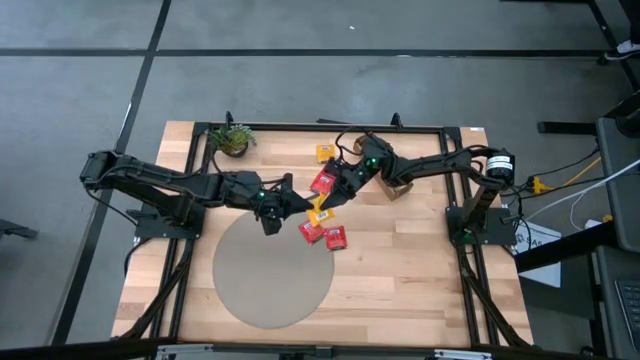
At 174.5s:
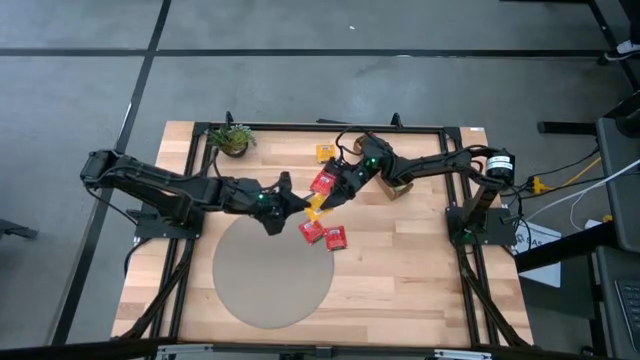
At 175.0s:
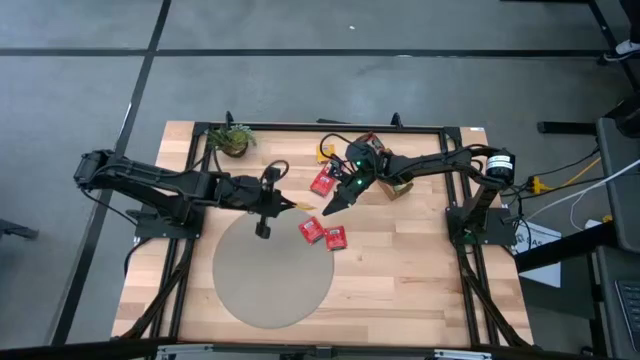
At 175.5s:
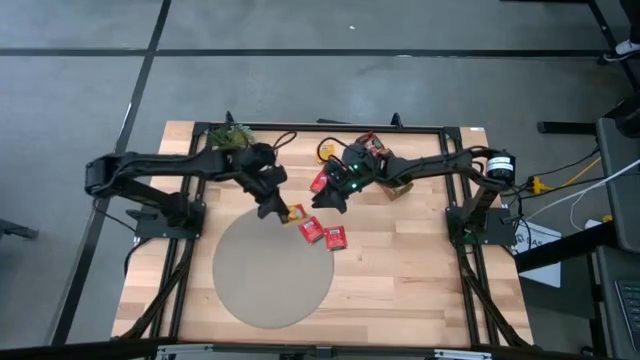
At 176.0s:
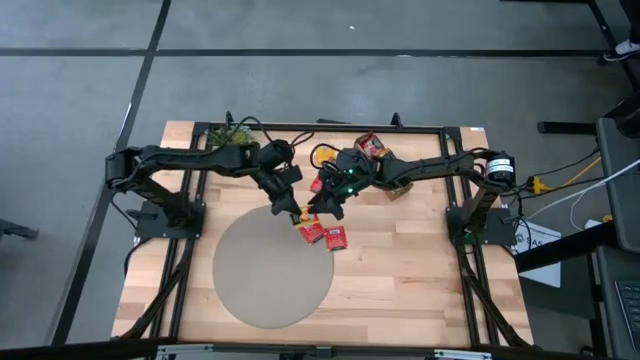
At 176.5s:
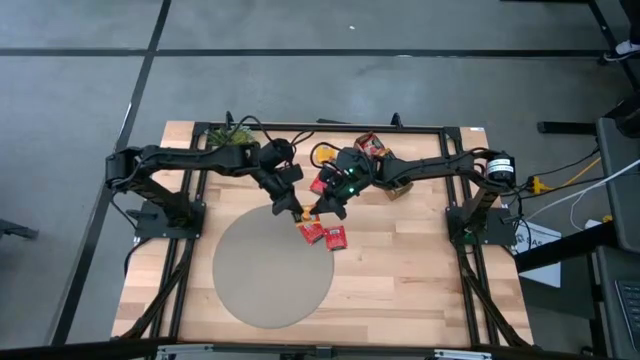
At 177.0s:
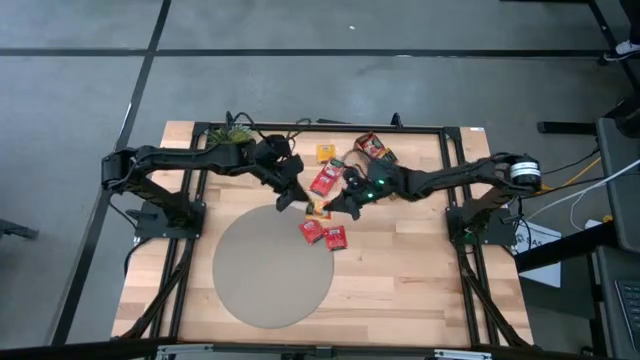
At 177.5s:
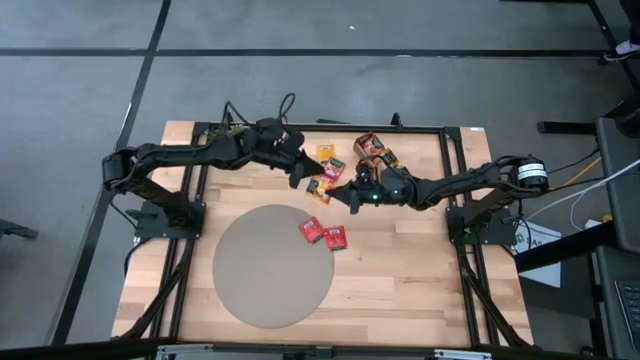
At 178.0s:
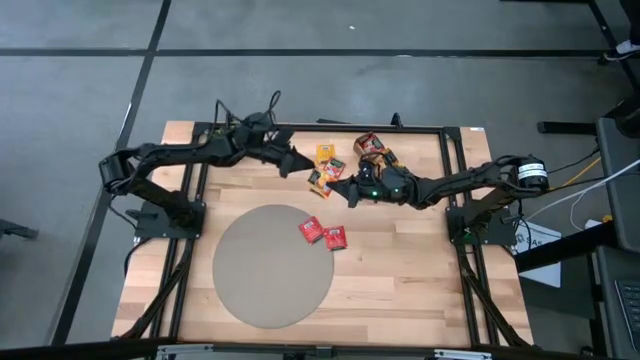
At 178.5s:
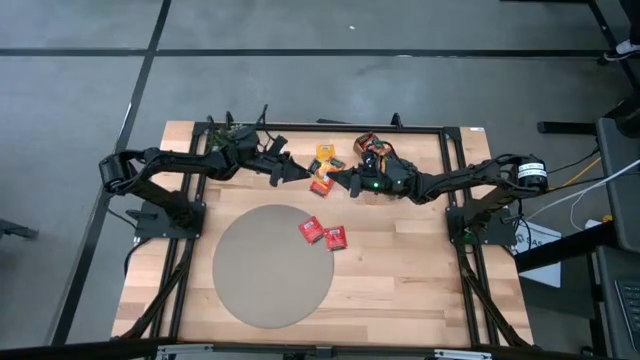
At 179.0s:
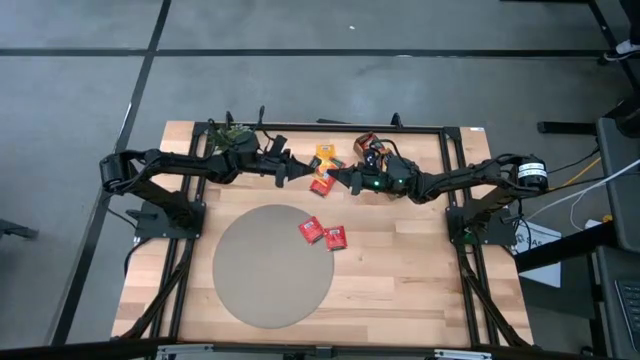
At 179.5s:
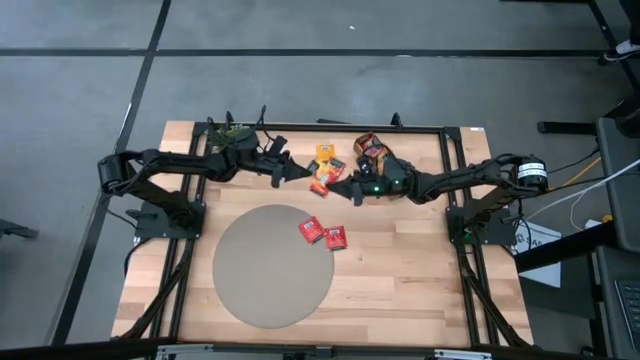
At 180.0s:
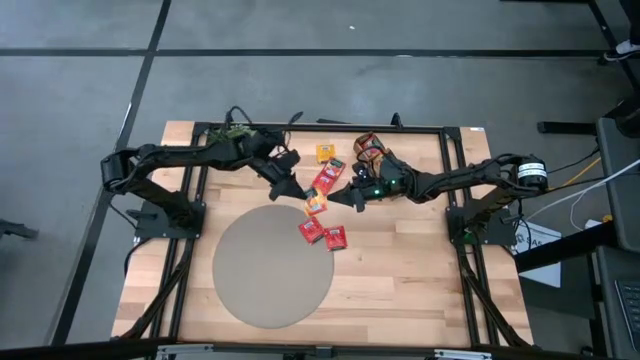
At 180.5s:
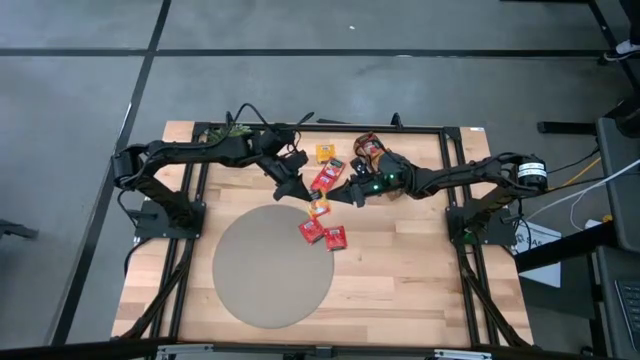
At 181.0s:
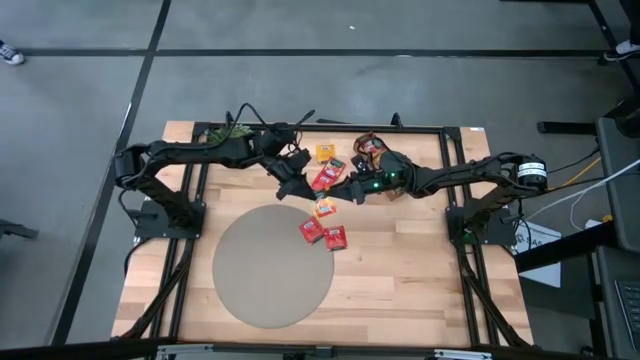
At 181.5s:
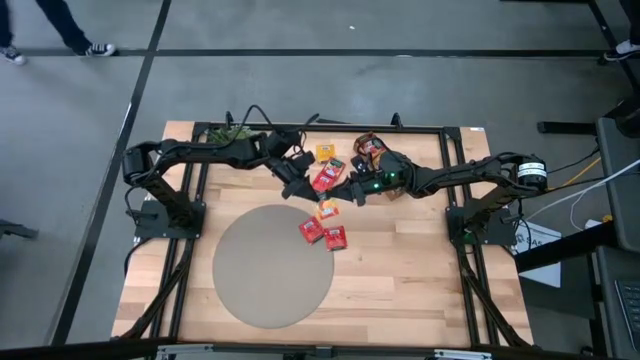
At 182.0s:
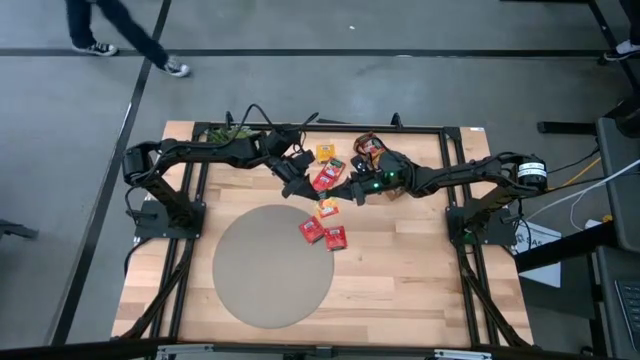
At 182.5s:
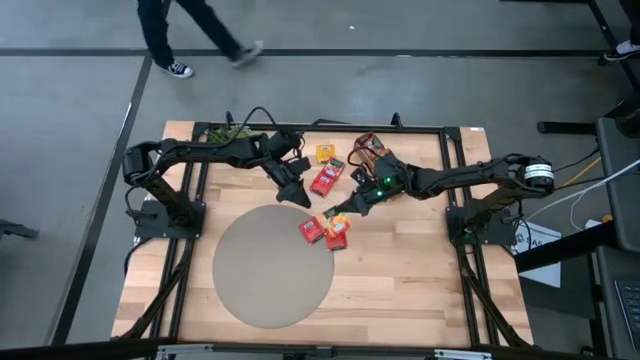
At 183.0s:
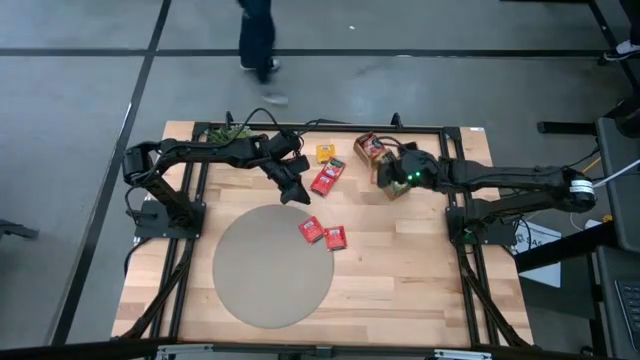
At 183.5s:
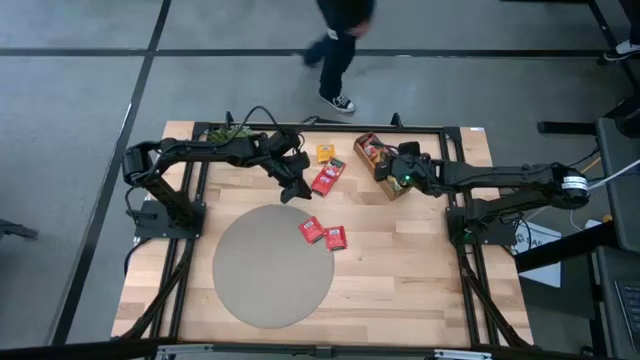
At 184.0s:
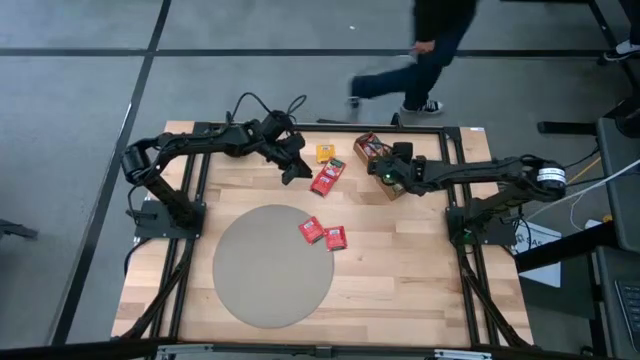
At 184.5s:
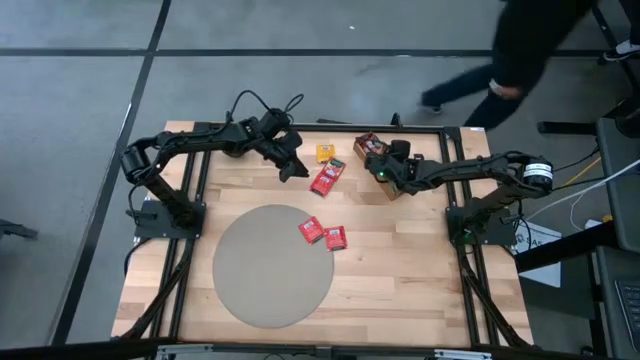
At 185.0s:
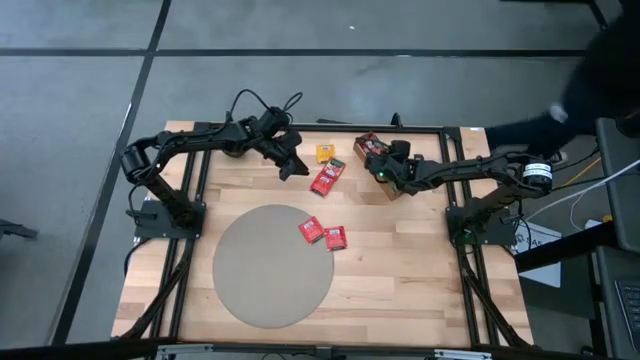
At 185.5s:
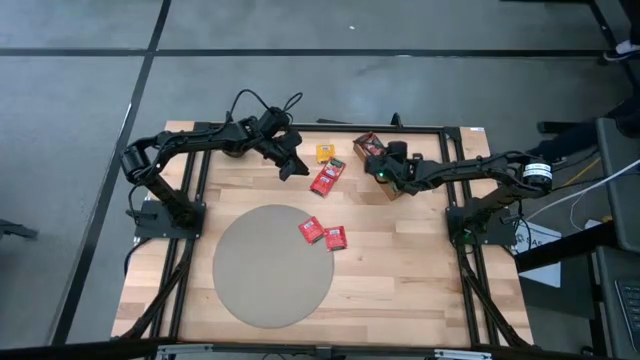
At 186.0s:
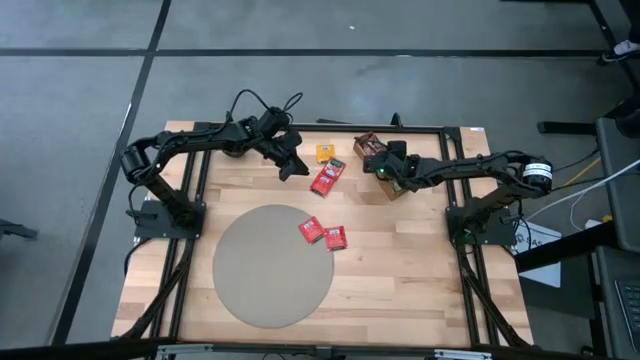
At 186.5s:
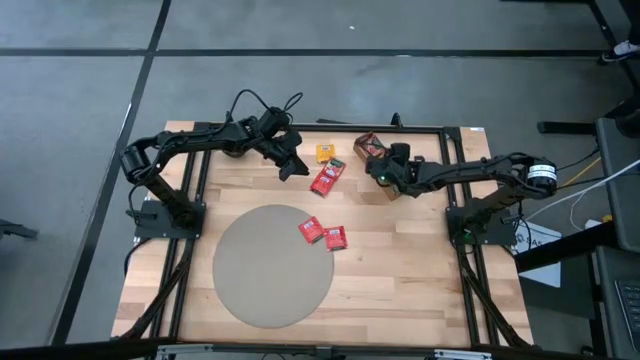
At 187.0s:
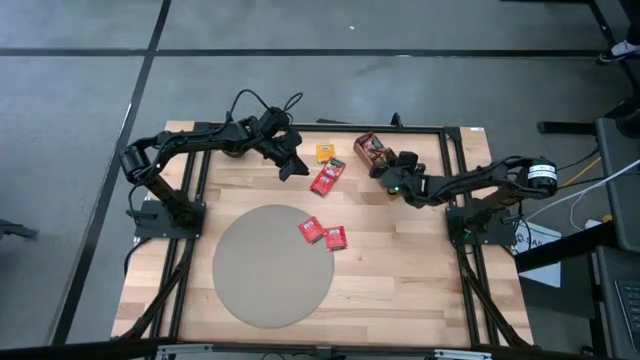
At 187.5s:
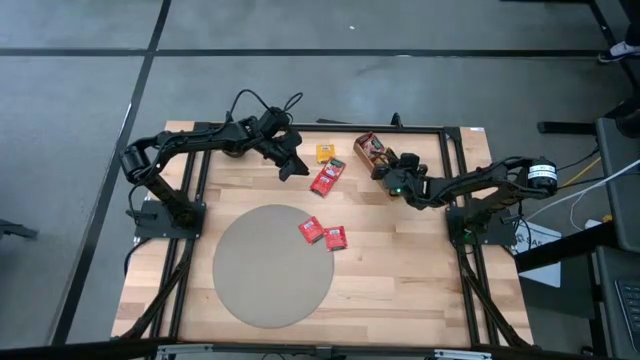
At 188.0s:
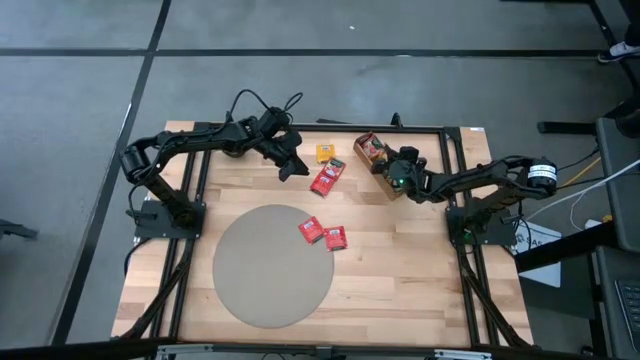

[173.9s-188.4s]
Task: Pick & Place Tea
Put the orange tea bag into the middle section of the wooden organizer

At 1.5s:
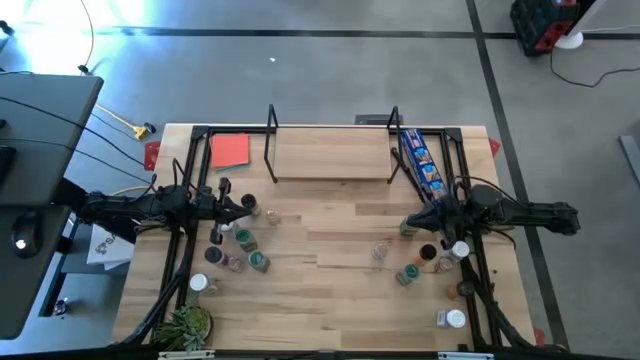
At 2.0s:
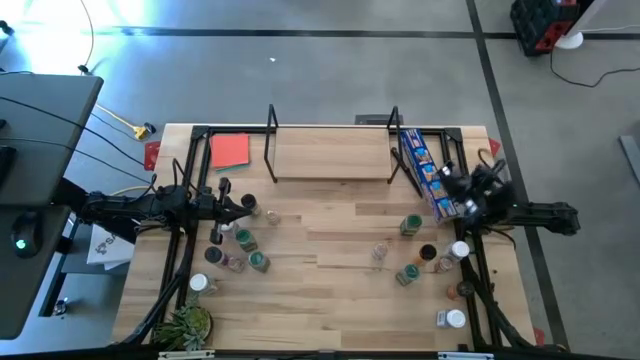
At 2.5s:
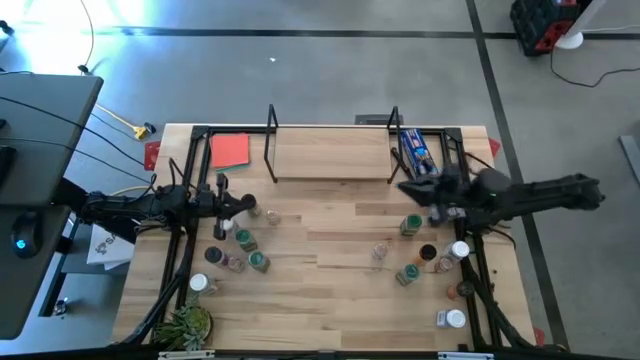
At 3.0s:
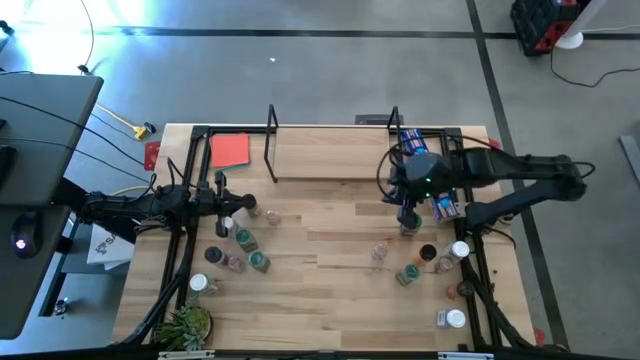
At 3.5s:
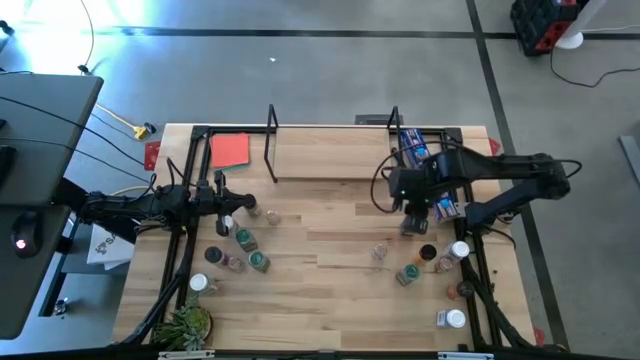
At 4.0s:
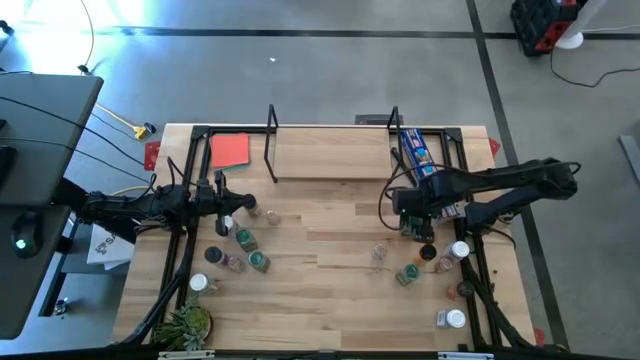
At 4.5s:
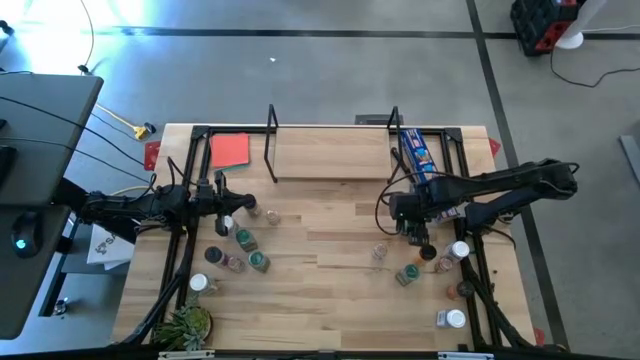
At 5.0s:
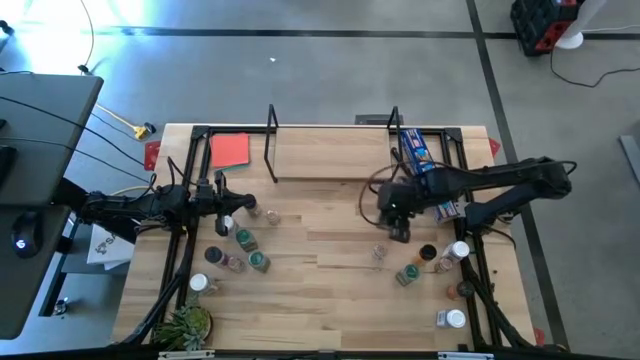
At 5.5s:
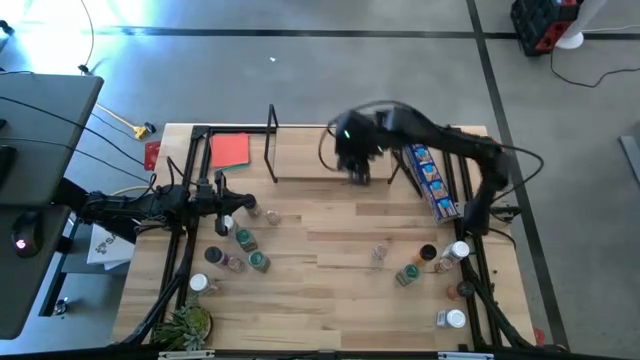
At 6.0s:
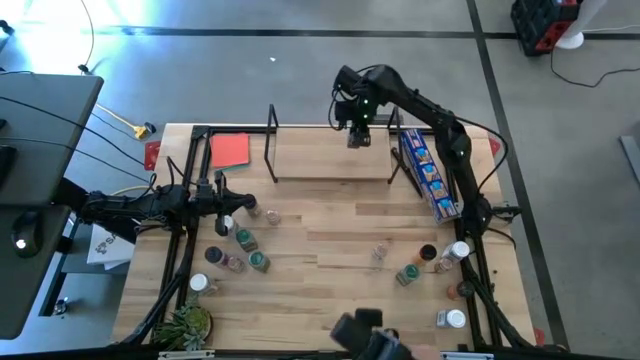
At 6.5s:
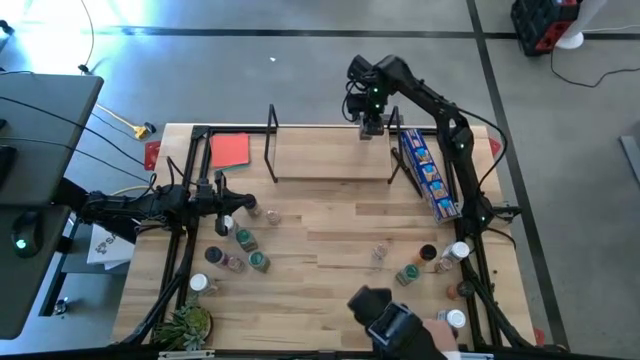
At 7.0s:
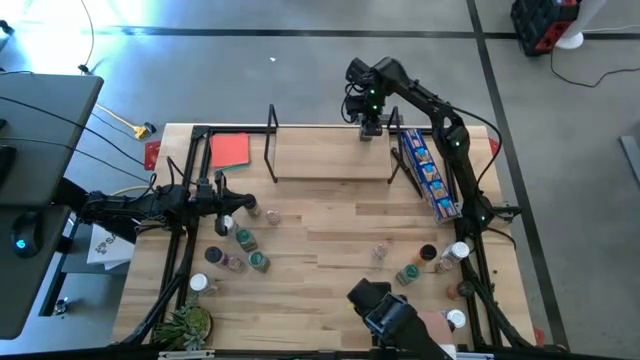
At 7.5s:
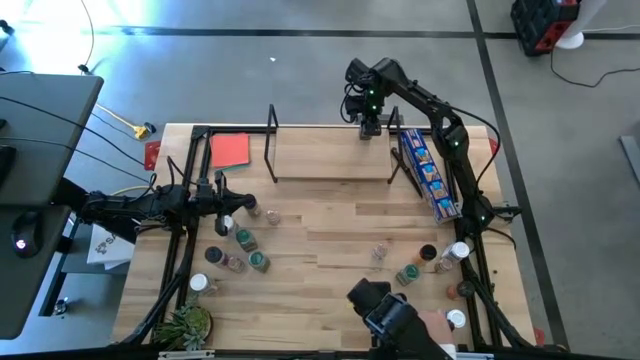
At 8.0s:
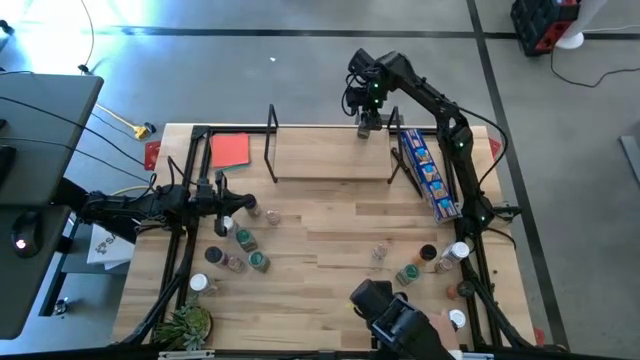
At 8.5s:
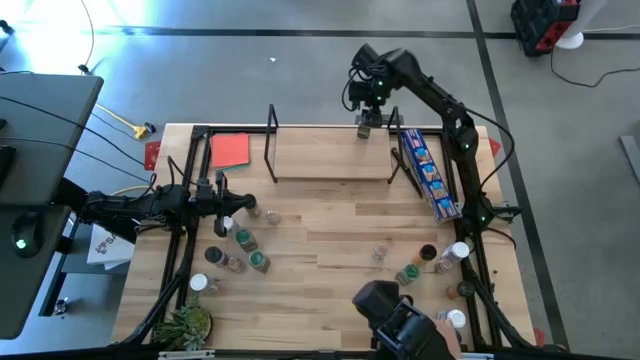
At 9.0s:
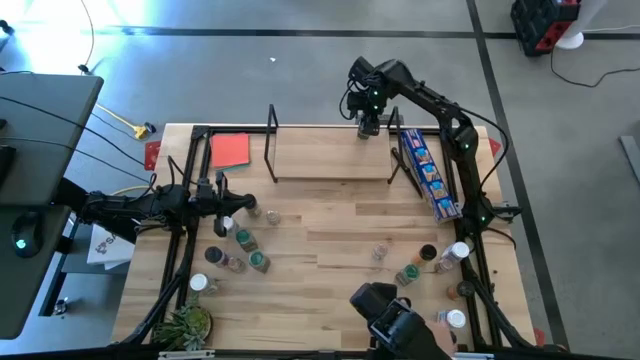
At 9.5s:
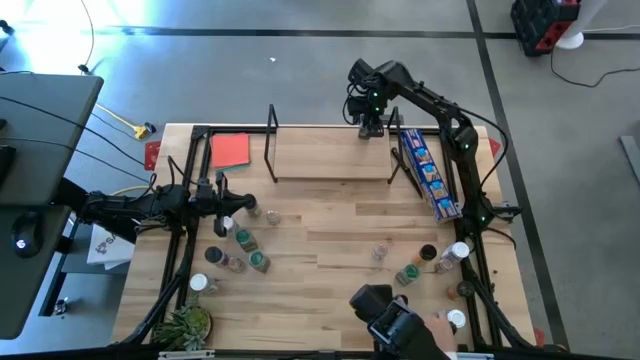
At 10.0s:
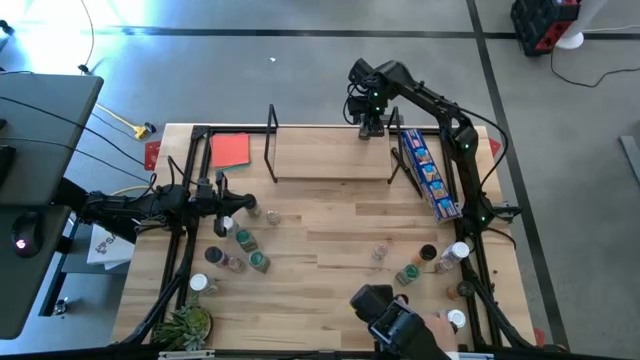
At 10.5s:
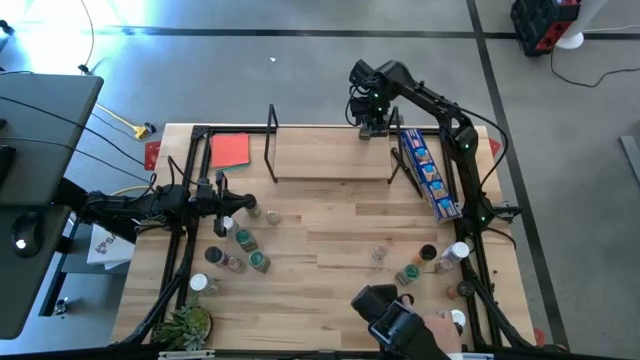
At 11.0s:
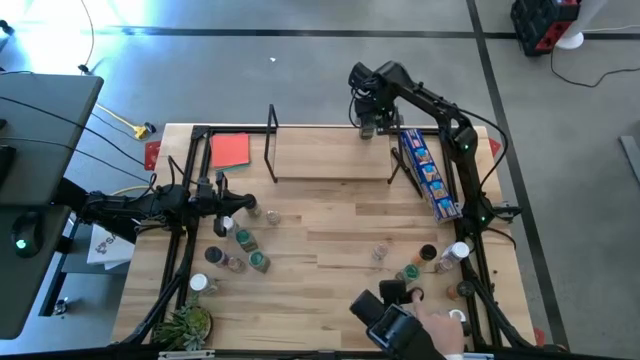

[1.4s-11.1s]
Task: Shelf spices
Put the green seasoning bottle on the shelf
